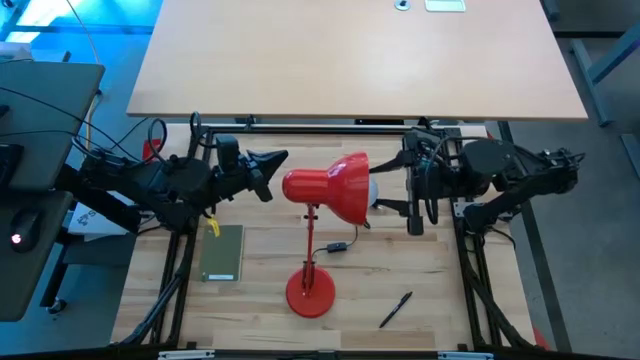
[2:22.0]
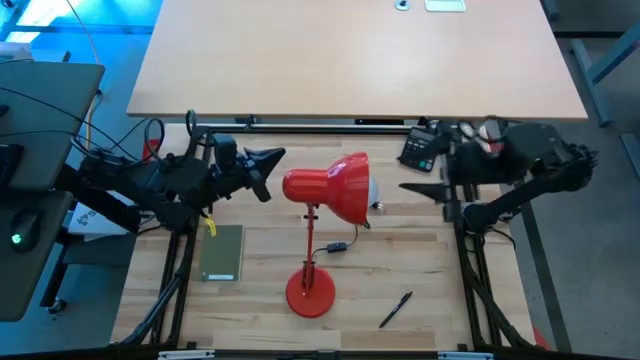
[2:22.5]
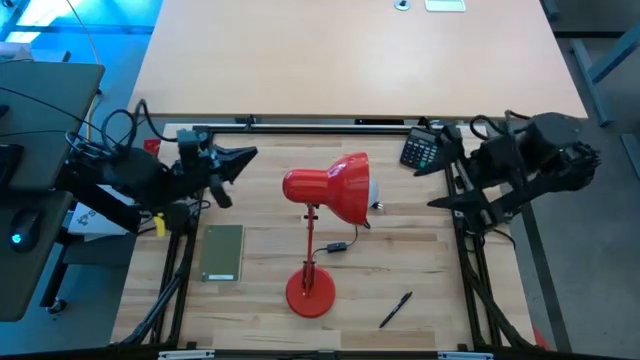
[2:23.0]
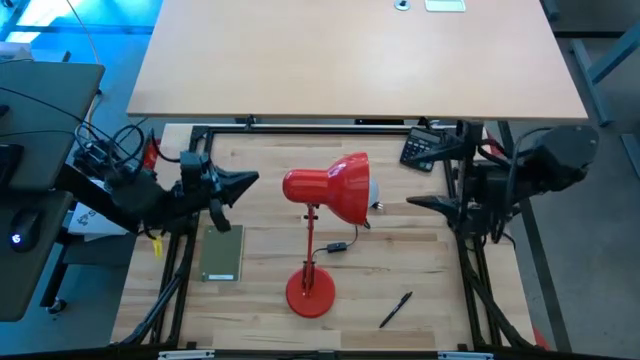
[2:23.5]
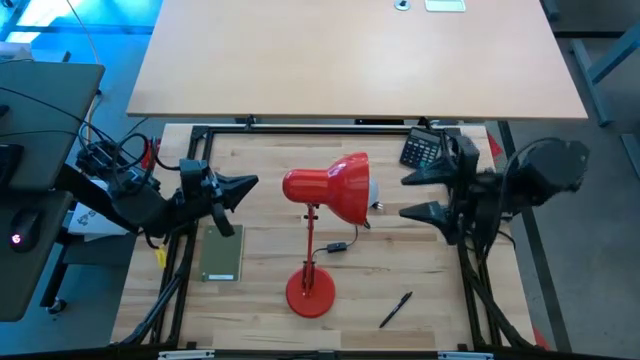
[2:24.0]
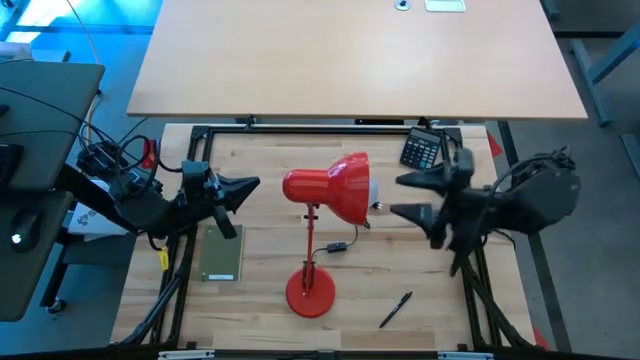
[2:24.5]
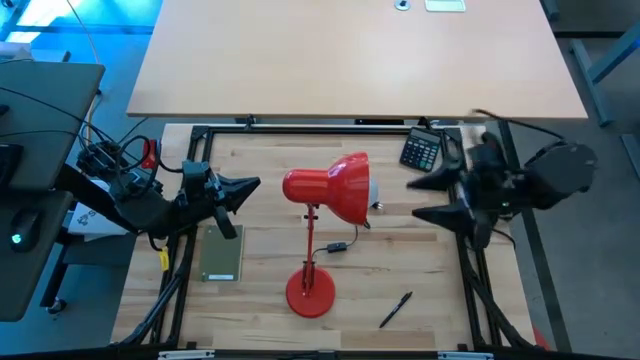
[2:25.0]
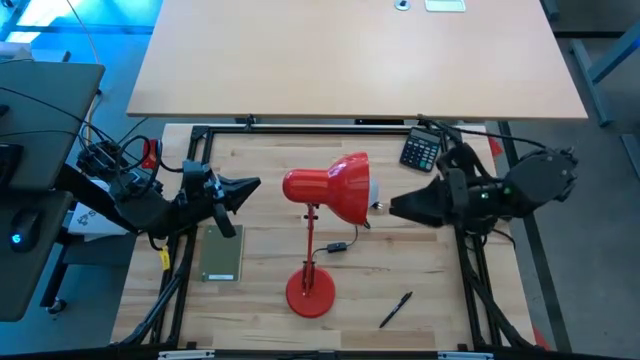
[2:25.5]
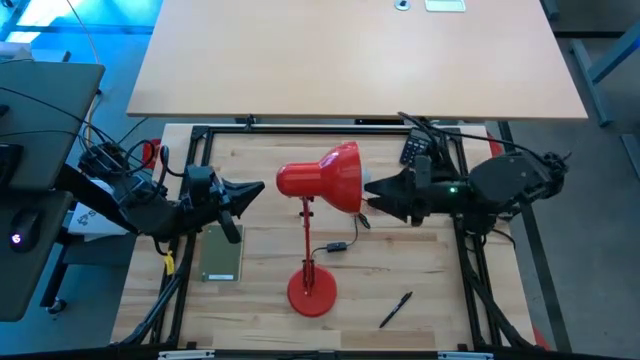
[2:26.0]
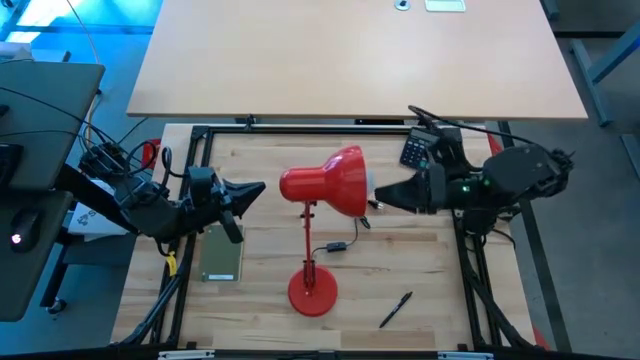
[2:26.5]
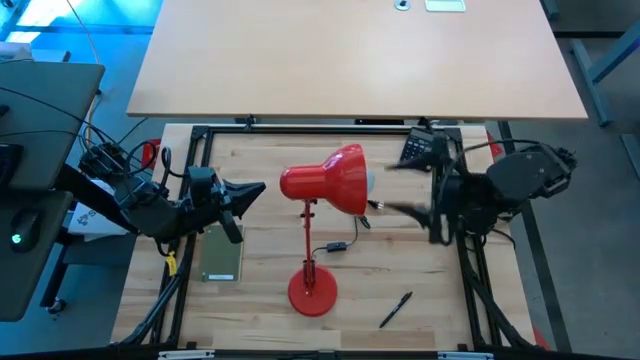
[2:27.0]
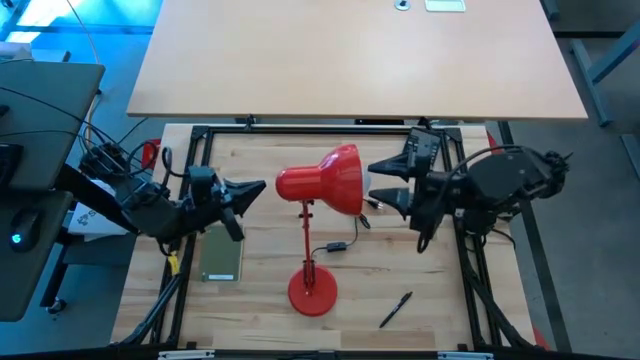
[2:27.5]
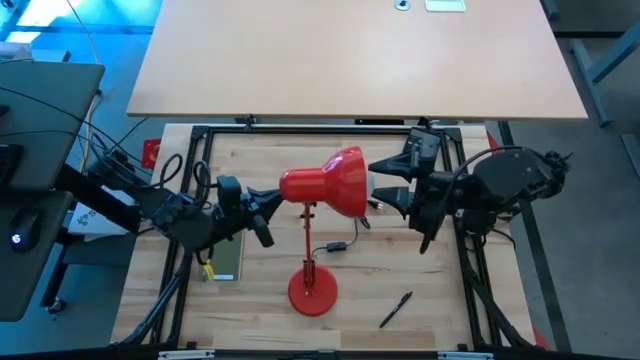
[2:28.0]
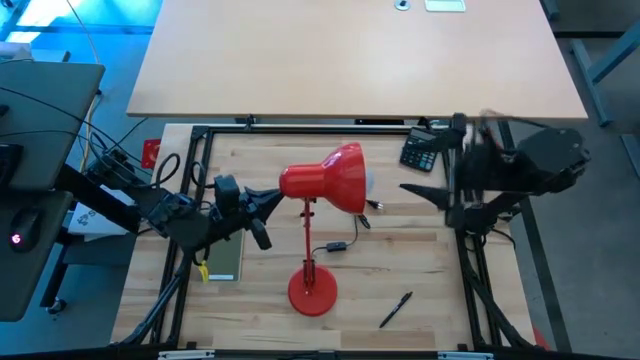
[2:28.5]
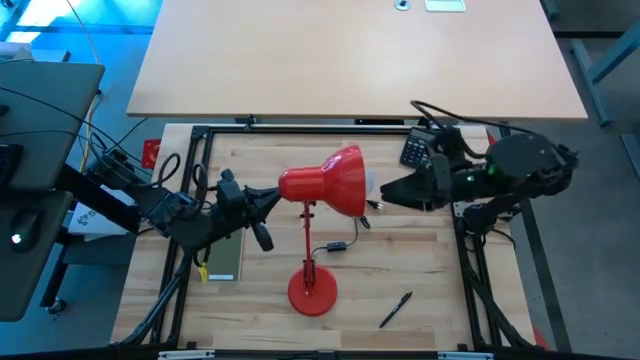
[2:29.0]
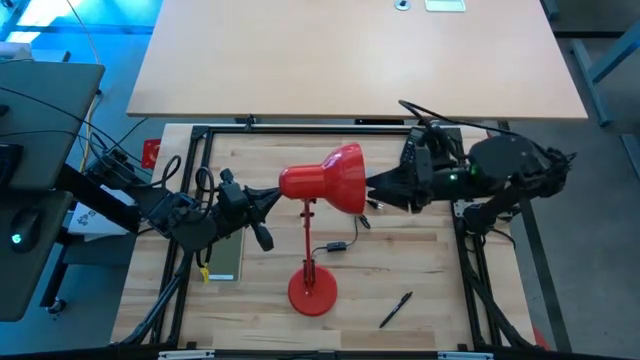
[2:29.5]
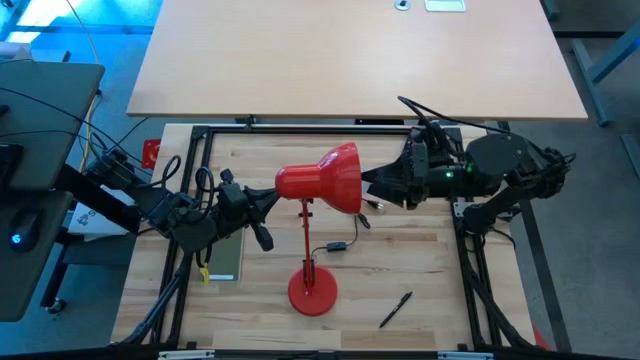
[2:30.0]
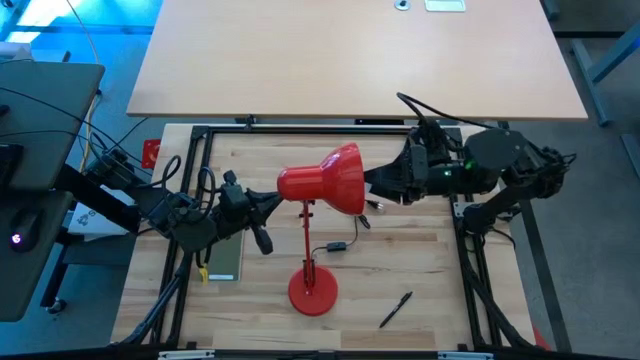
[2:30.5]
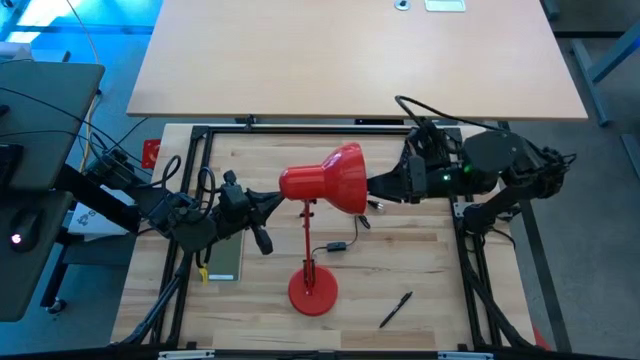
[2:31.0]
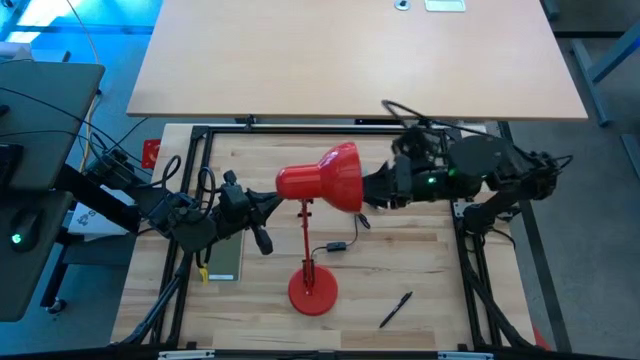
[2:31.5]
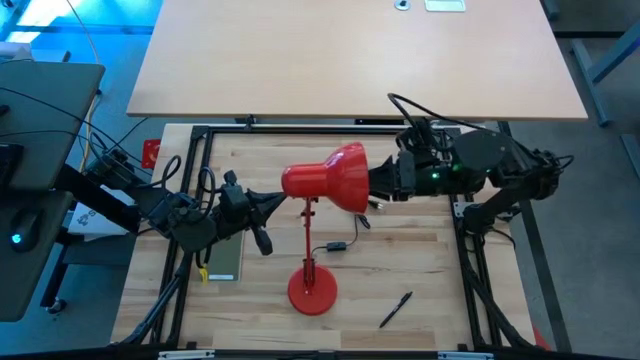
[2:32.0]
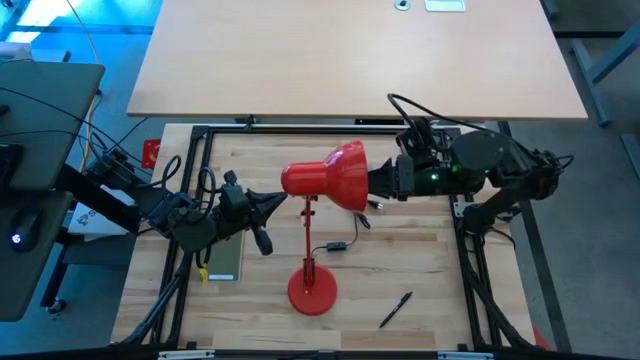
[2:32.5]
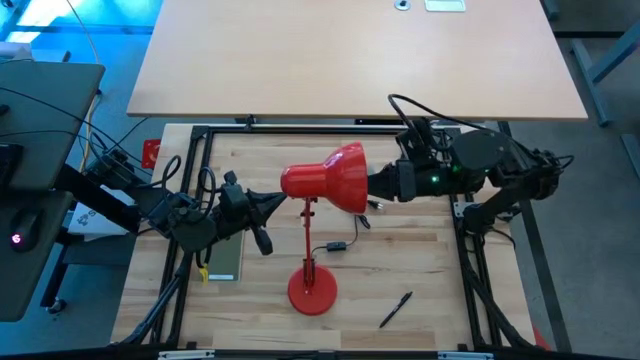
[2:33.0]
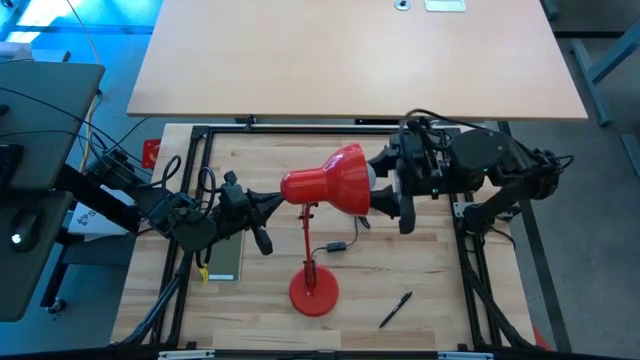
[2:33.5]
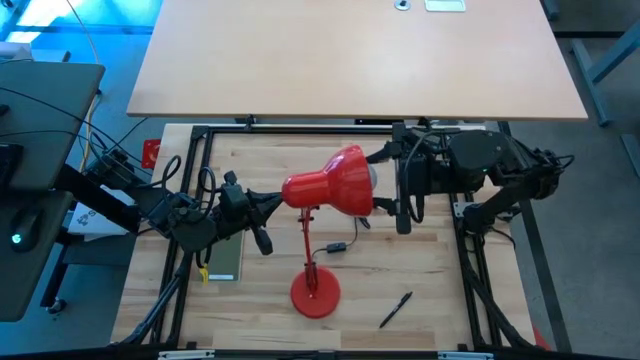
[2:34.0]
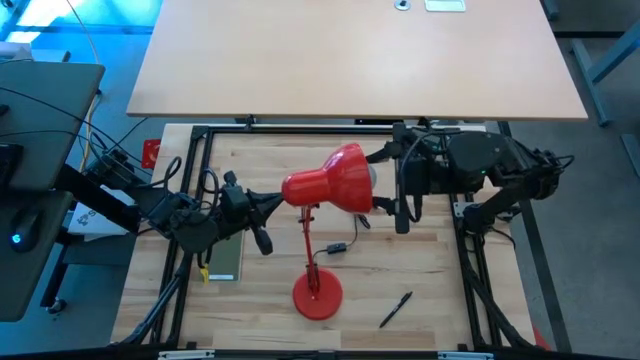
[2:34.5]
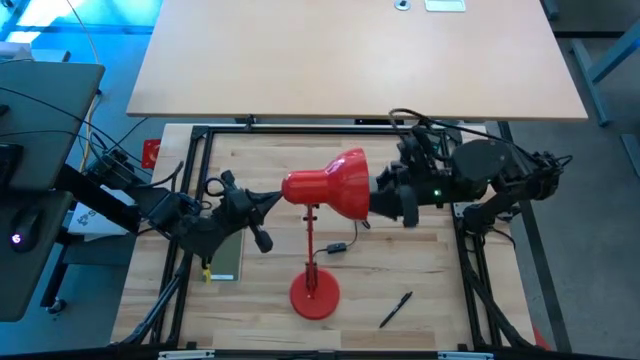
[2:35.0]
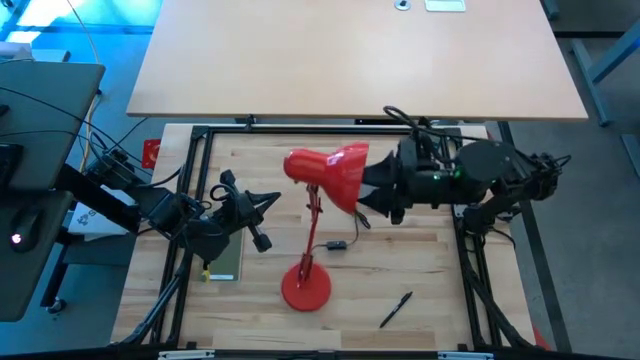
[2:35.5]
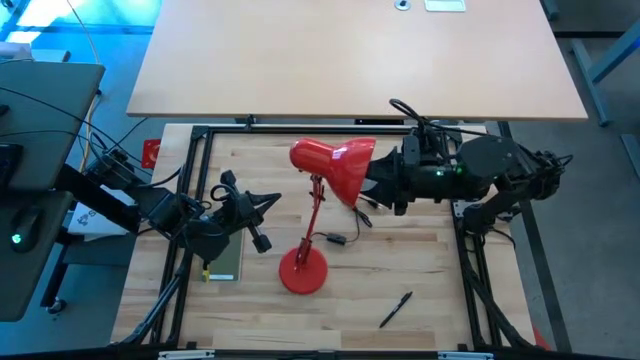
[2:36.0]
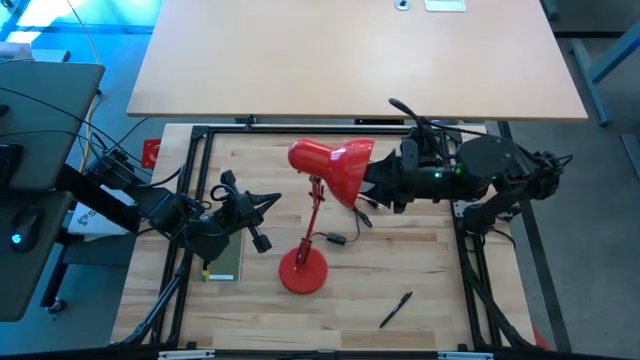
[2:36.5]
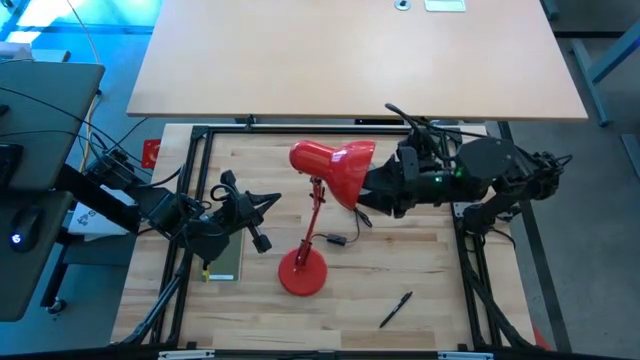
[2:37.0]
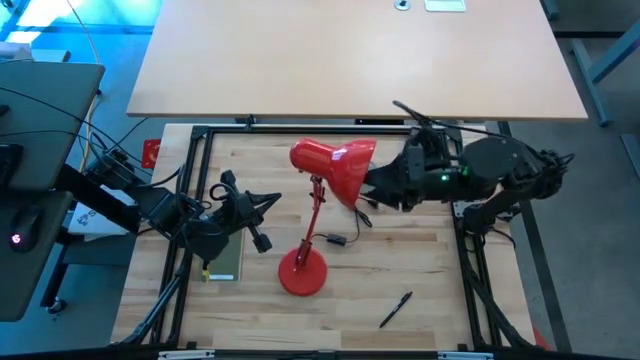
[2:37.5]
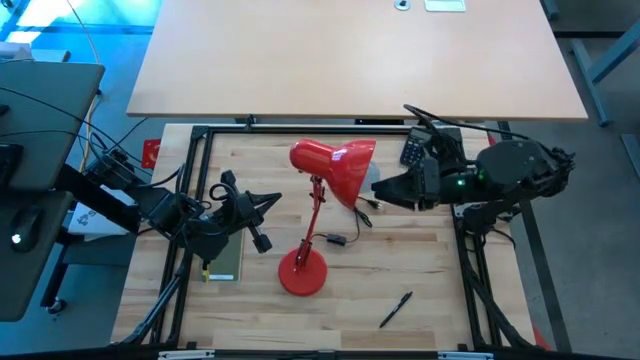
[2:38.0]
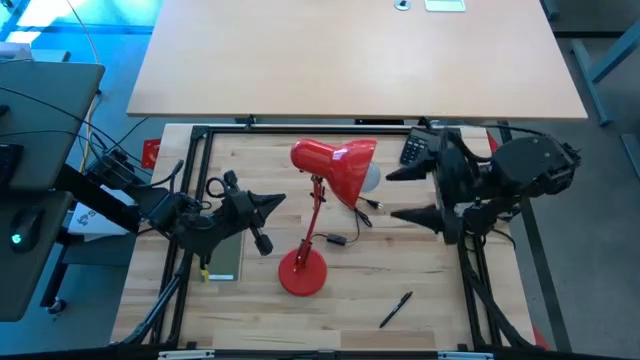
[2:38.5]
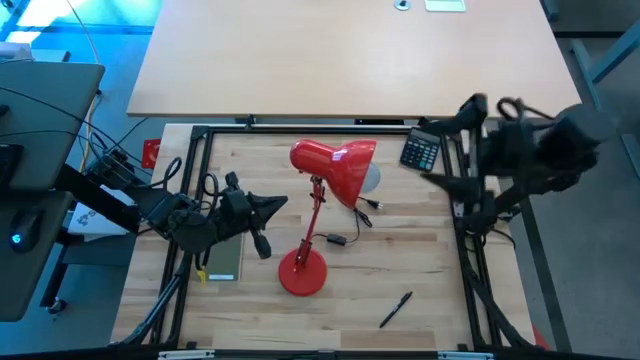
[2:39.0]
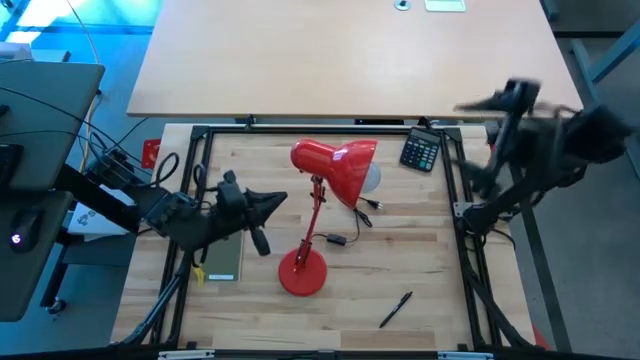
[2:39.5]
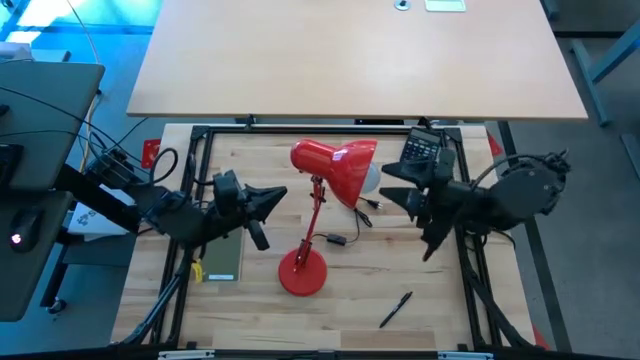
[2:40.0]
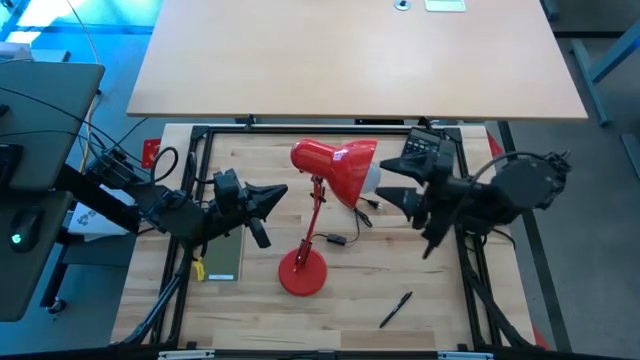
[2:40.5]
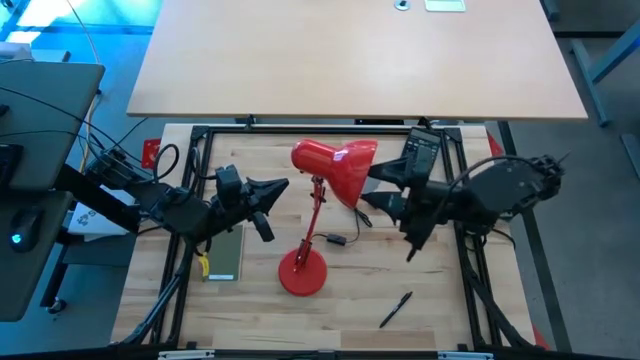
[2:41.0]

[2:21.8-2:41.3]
Task: Screw lightbulb
Insert the white lightbulb into the red lamp

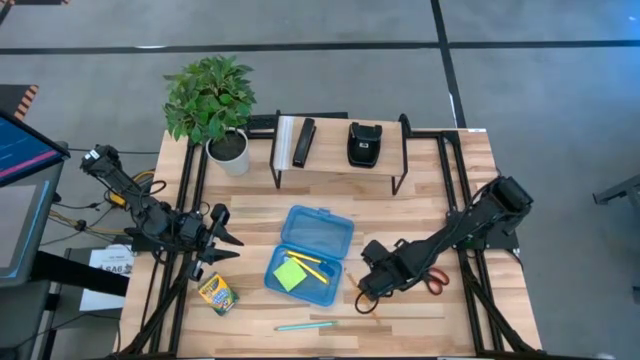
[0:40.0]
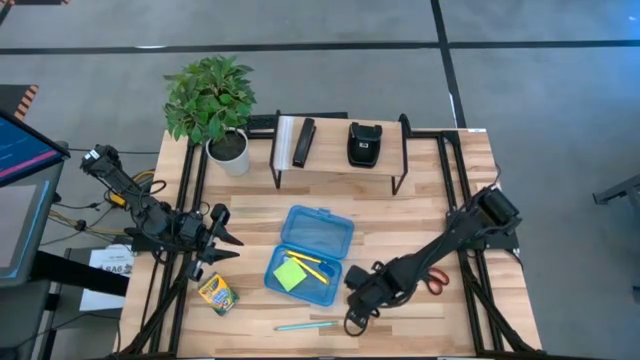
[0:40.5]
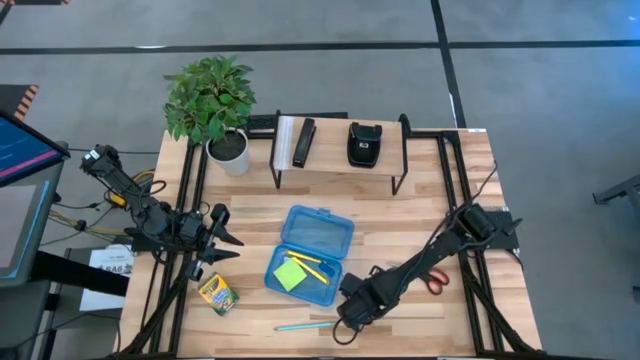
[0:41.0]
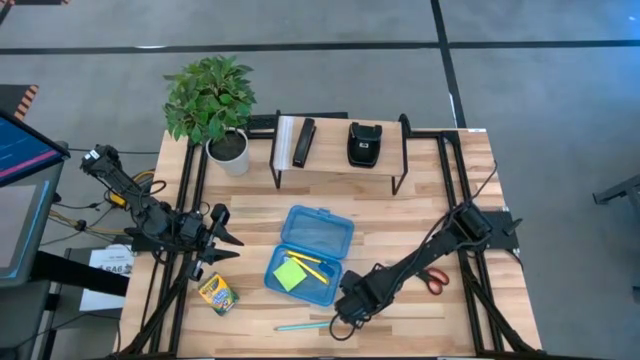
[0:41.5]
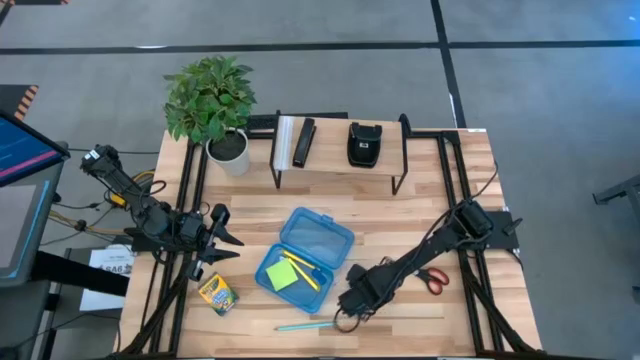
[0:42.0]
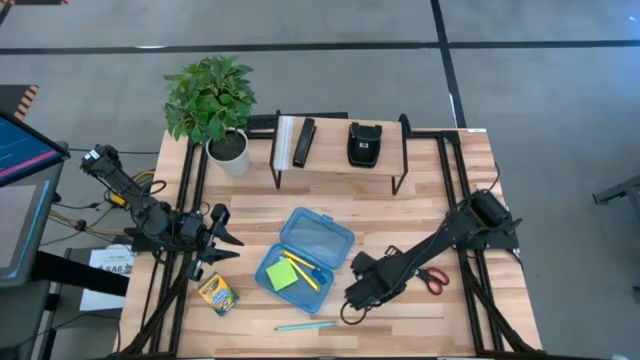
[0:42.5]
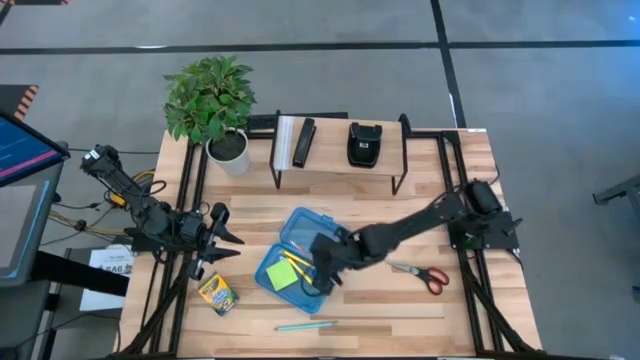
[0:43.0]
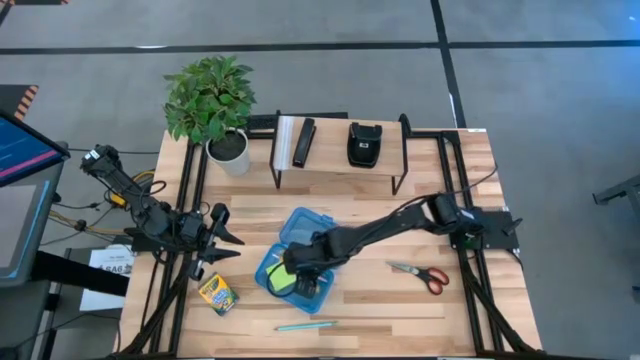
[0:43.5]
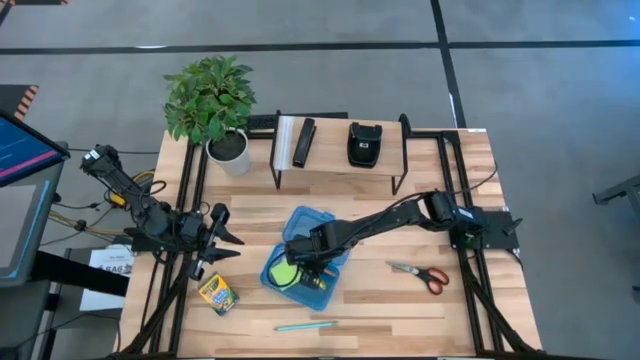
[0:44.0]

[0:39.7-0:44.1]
Task: Pack school essentials
Put the orange pencil into the blue supply box
